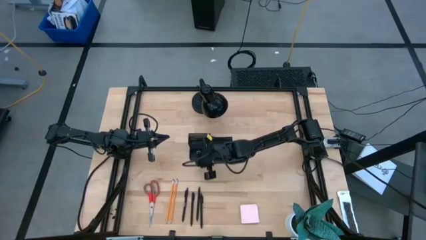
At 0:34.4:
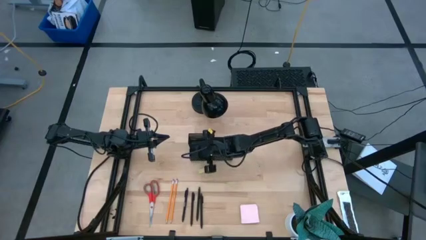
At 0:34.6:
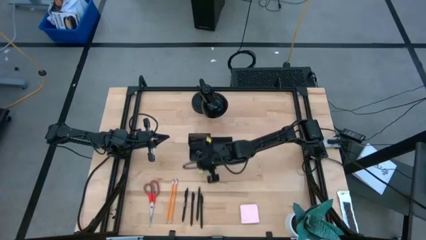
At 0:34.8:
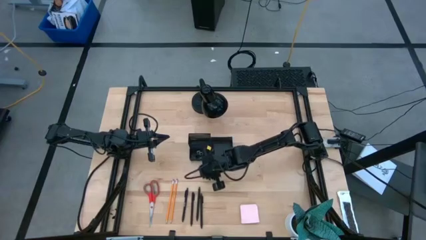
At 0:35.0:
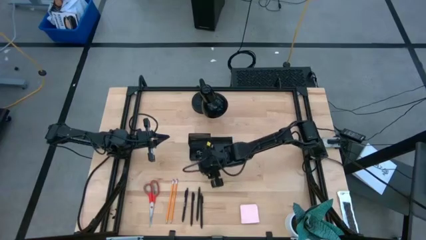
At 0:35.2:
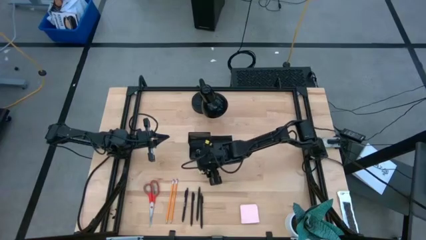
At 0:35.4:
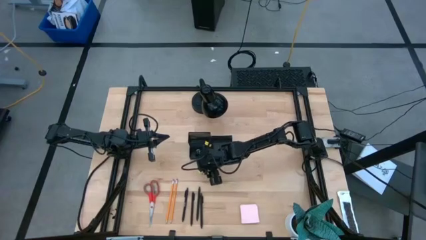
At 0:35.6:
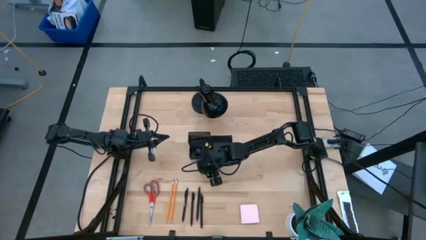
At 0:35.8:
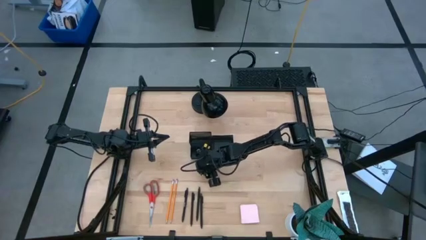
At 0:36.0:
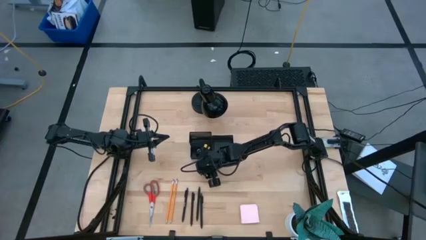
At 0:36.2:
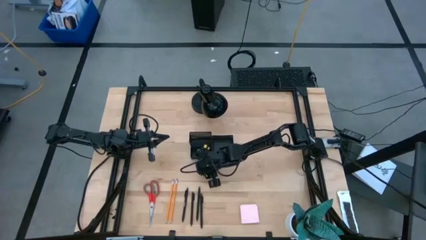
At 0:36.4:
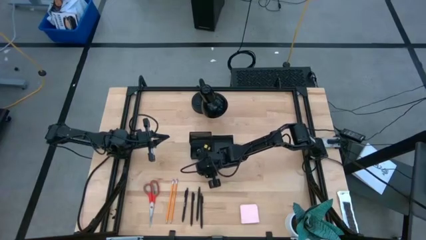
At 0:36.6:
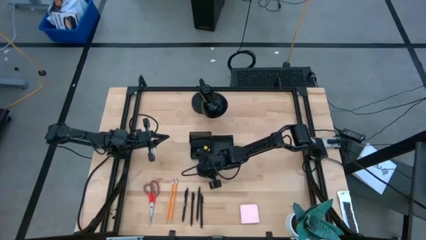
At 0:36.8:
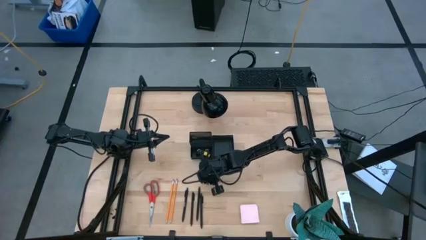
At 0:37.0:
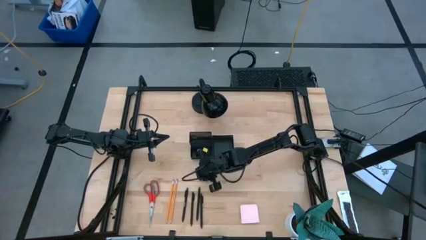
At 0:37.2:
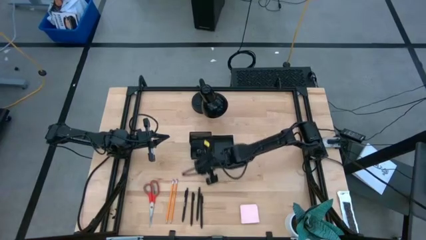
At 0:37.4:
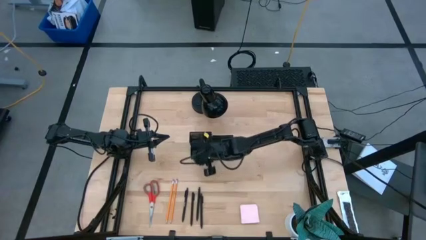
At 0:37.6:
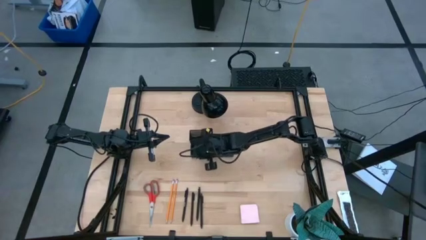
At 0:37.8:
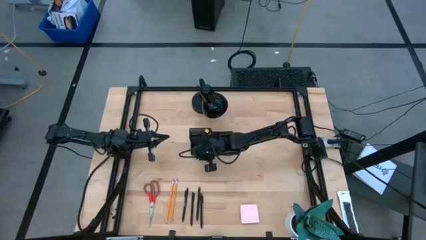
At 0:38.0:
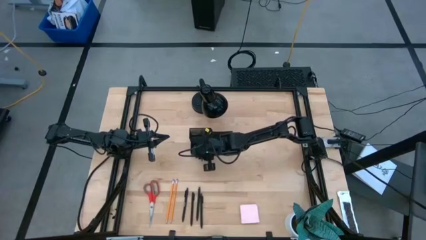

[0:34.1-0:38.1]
Task: Pick and place office supplies into organizer
Put the yellow eraser into the black desk organizer

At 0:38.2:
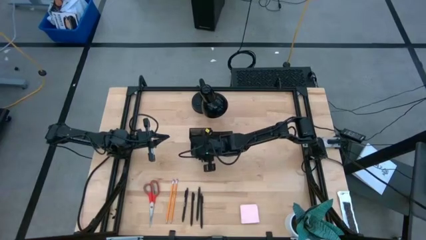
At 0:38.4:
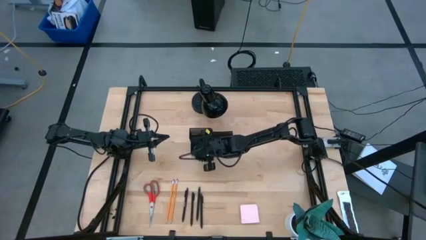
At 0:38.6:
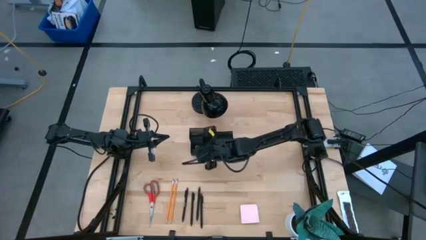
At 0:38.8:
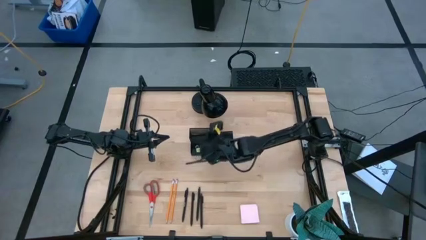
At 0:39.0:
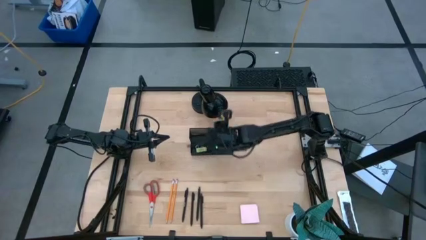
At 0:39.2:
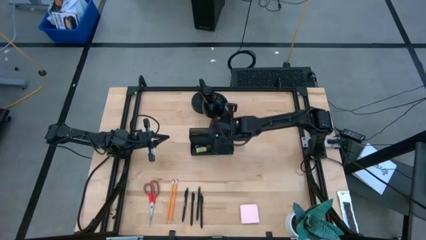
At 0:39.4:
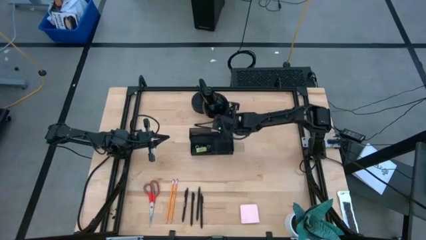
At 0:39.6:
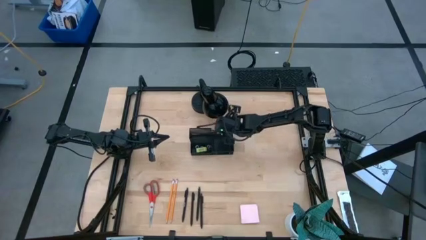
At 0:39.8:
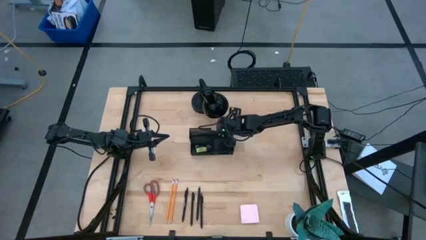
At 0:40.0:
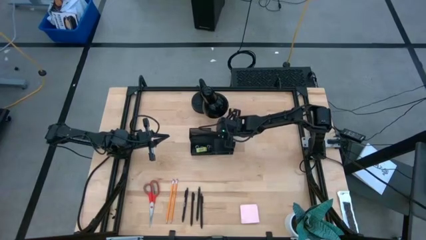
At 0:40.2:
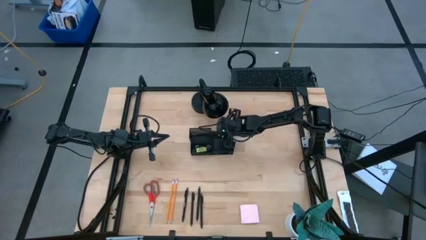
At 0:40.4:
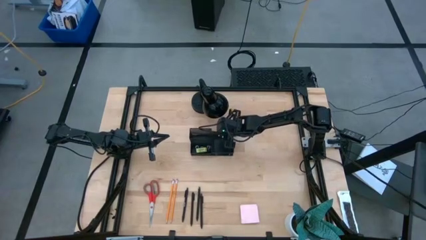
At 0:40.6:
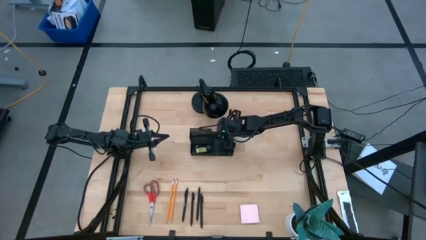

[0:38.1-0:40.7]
Adjust the black desk organizer

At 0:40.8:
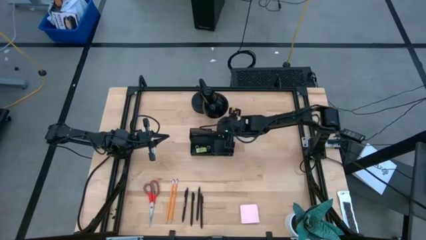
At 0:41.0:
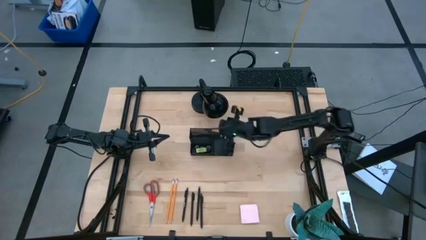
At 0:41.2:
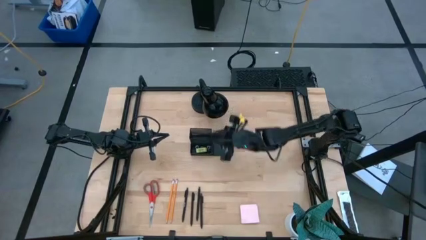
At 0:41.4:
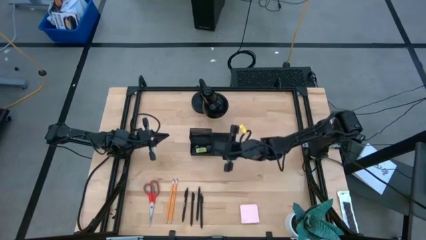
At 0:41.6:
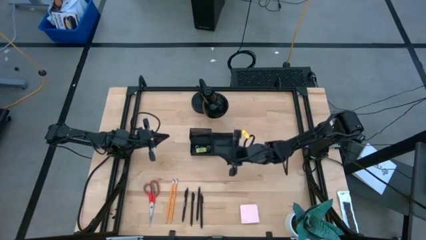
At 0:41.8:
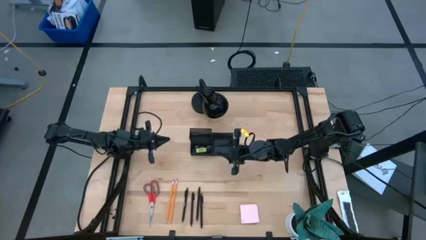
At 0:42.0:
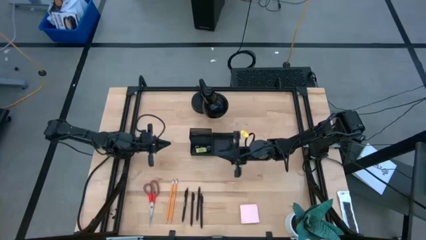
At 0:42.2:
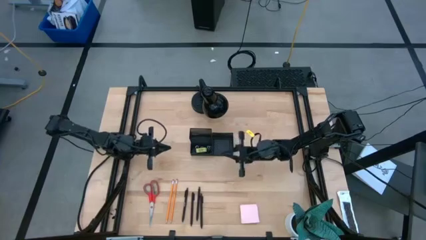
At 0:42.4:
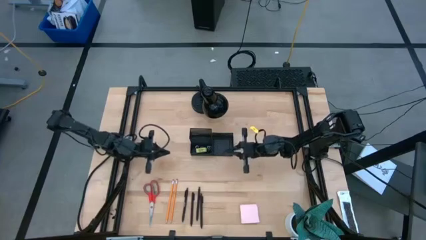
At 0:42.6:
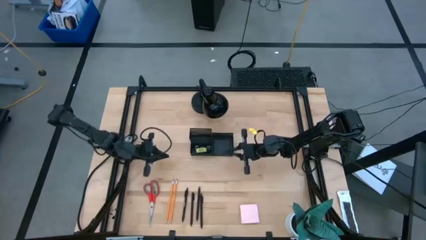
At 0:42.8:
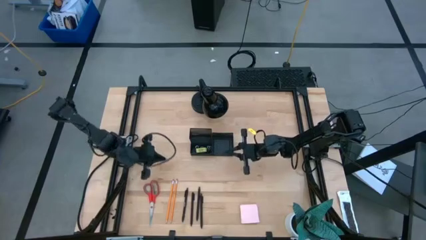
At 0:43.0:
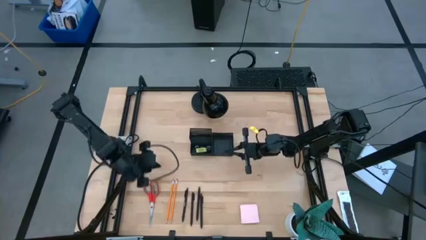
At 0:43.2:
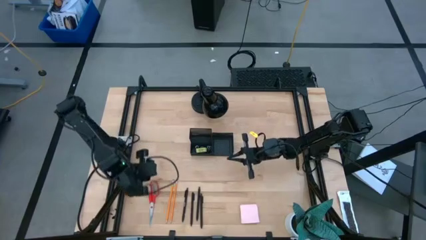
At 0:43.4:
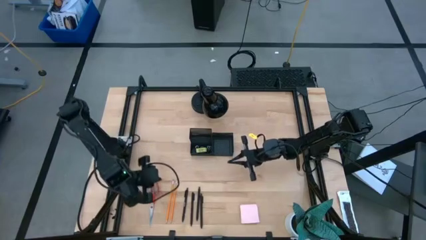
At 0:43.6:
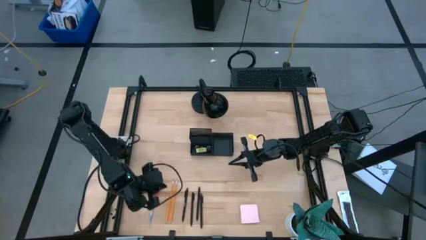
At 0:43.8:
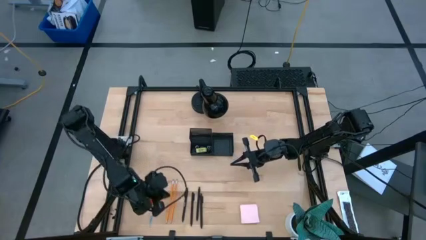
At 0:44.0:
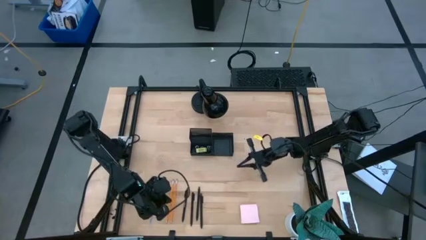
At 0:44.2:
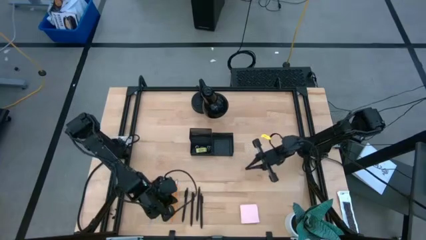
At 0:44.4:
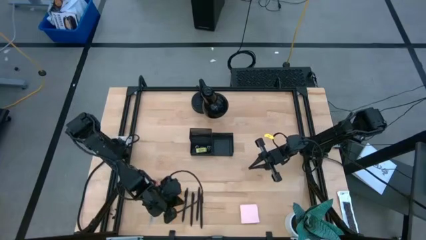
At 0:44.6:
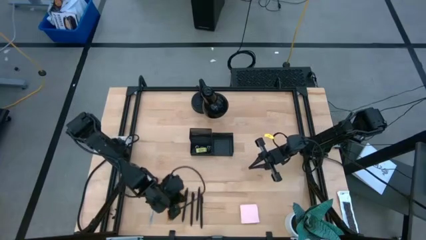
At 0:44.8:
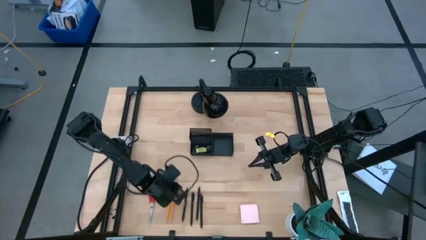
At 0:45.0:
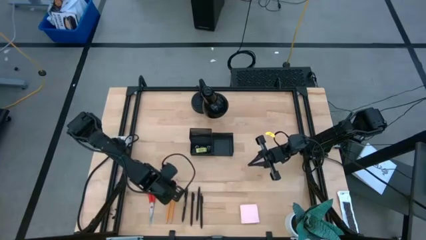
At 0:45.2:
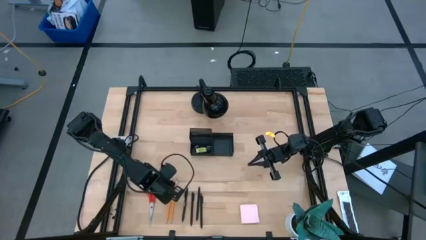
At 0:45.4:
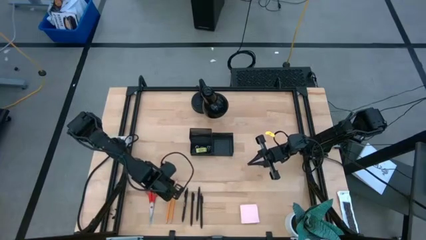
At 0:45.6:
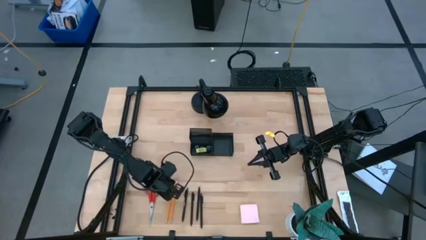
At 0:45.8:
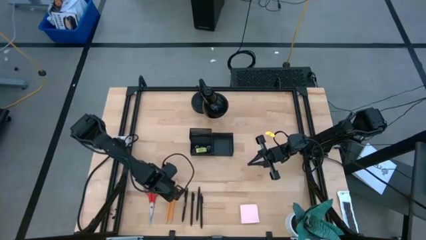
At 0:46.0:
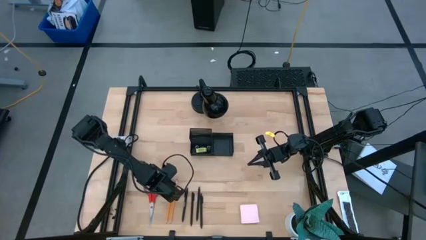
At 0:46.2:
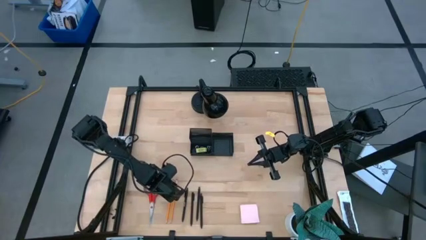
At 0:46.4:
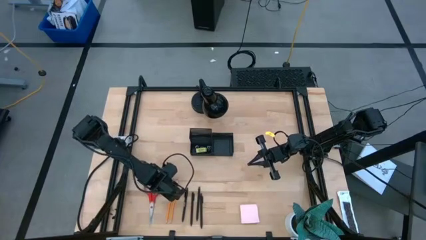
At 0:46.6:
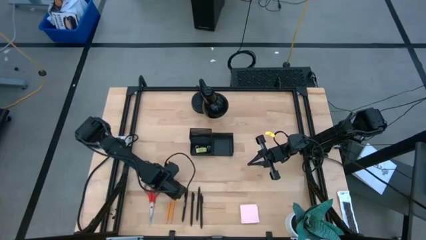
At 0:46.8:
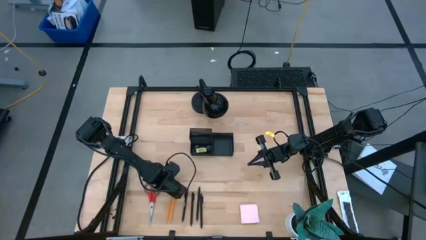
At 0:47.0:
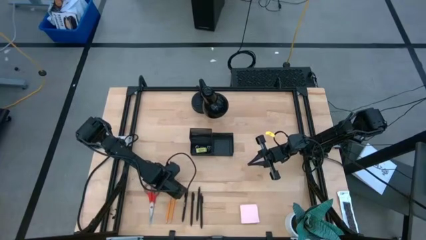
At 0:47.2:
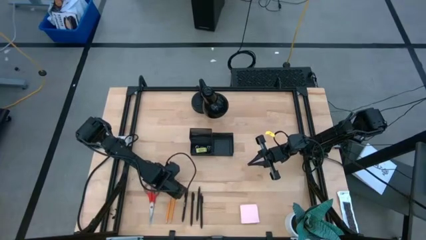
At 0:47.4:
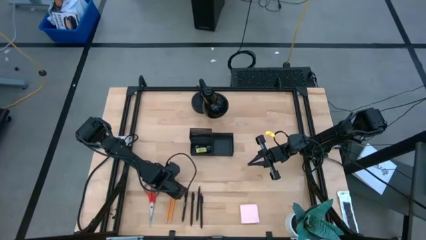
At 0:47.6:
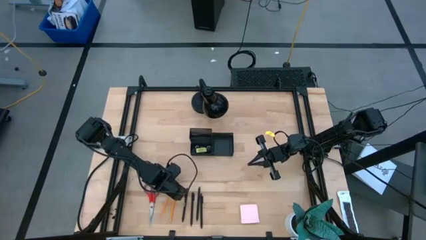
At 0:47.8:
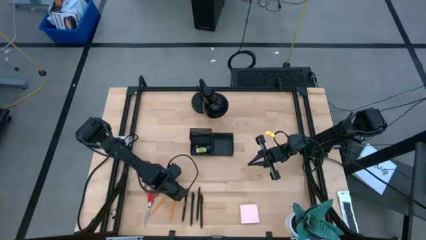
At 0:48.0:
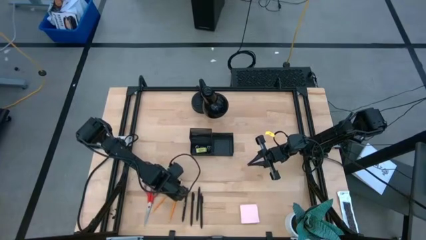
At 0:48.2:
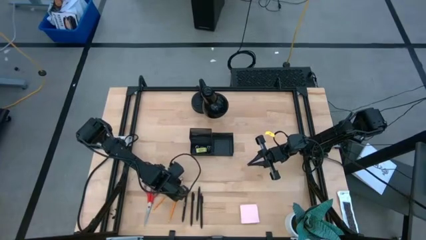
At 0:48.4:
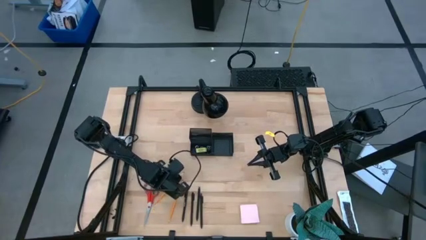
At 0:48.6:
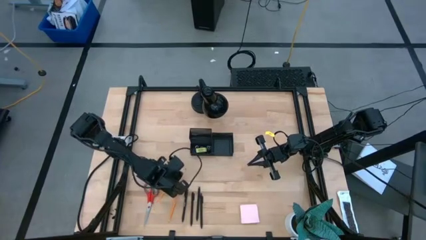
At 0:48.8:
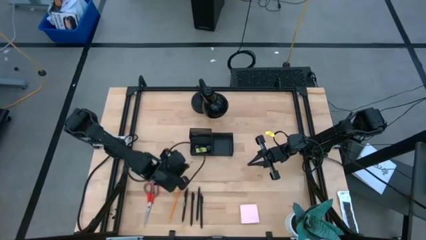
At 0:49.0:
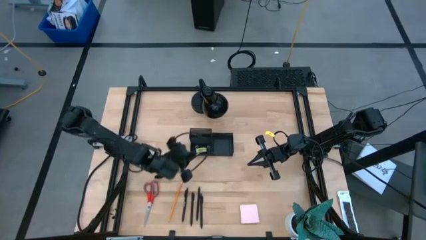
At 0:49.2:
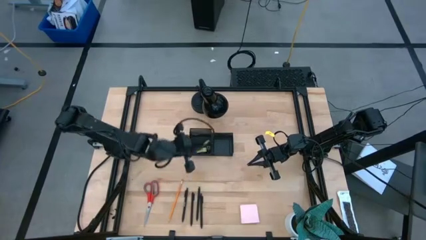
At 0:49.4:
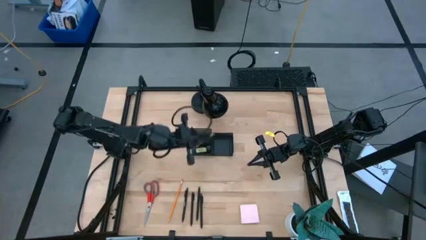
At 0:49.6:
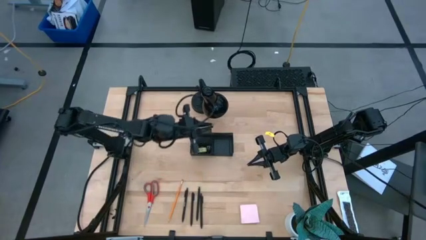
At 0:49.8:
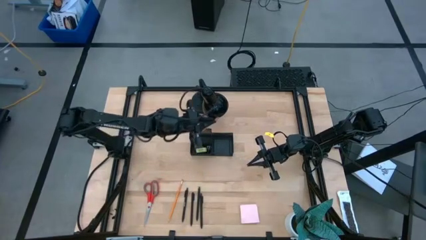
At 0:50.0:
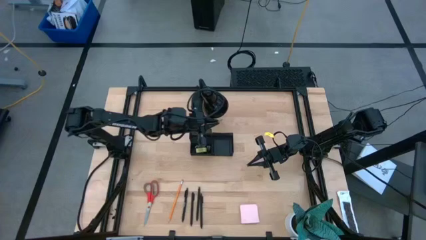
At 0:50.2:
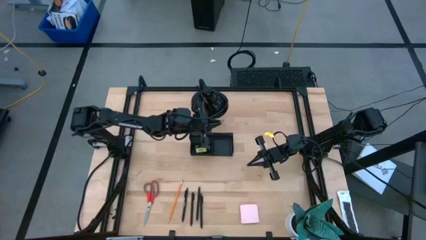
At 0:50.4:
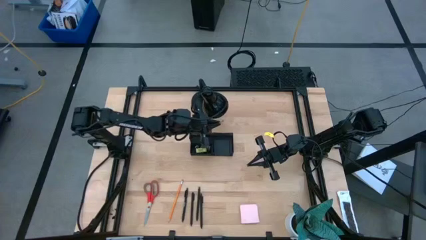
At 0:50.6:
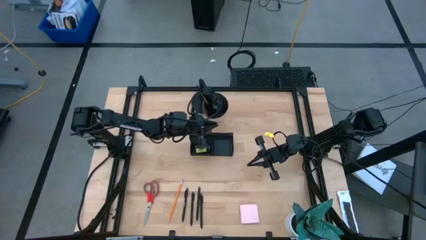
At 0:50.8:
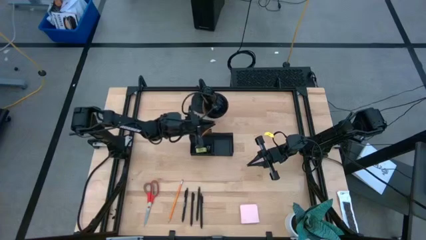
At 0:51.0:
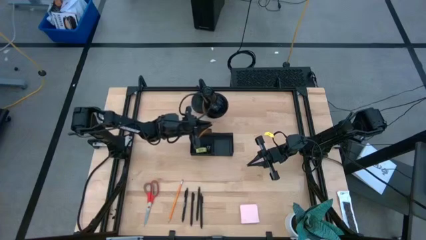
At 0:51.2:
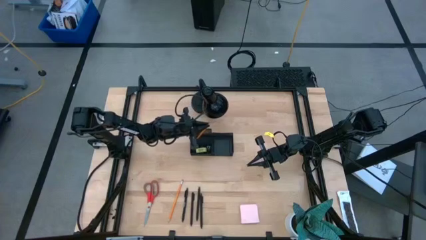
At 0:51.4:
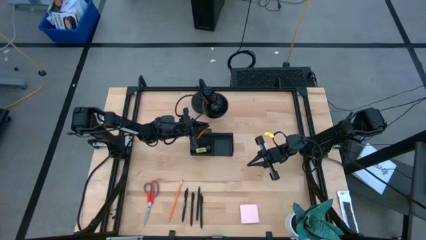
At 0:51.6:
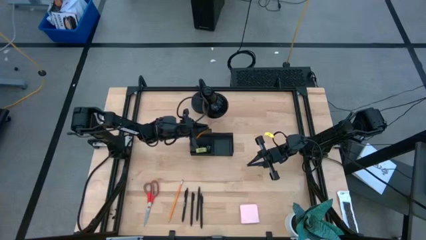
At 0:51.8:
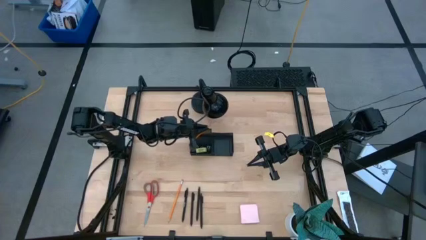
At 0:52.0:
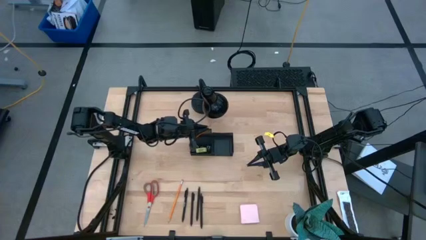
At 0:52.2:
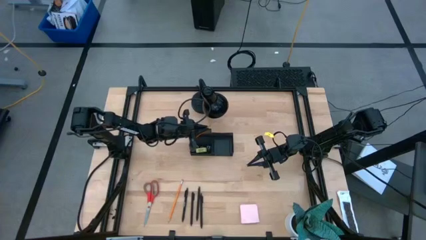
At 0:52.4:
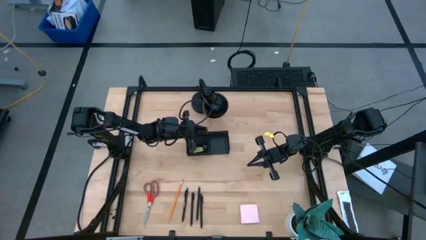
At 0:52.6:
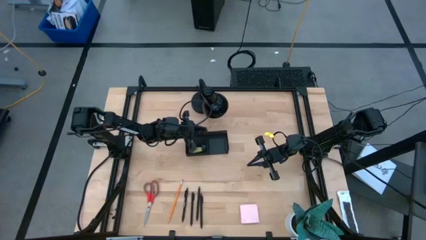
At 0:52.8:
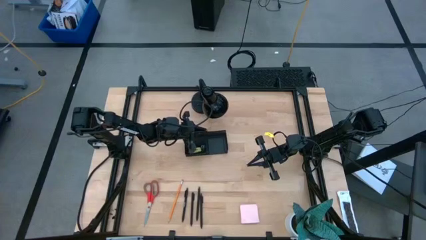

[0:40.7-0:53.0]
Put the orange pencil into the black desk organizer
